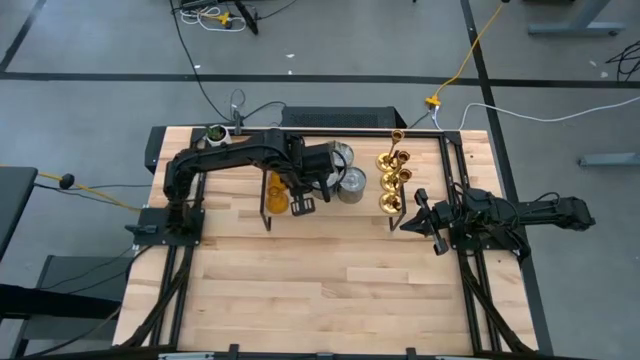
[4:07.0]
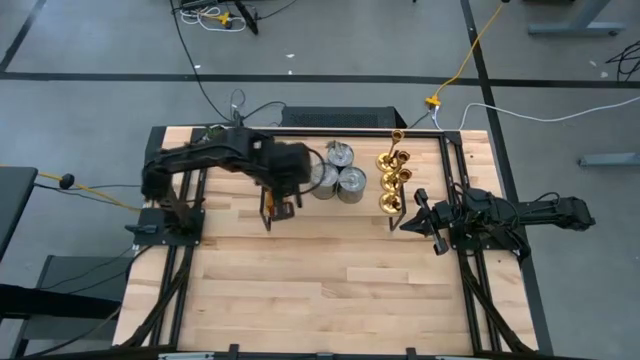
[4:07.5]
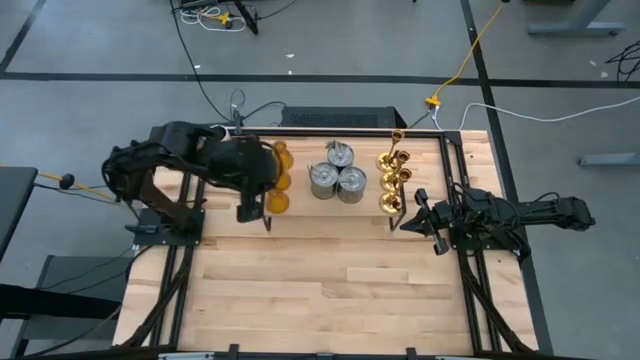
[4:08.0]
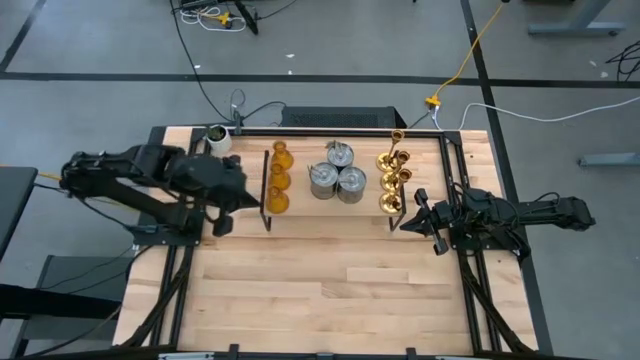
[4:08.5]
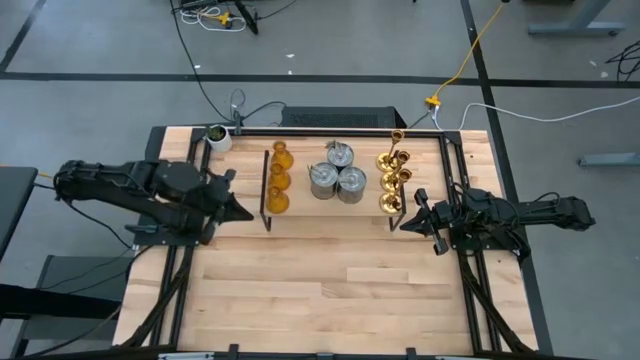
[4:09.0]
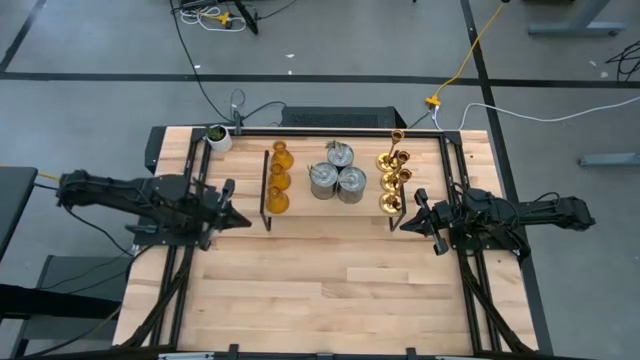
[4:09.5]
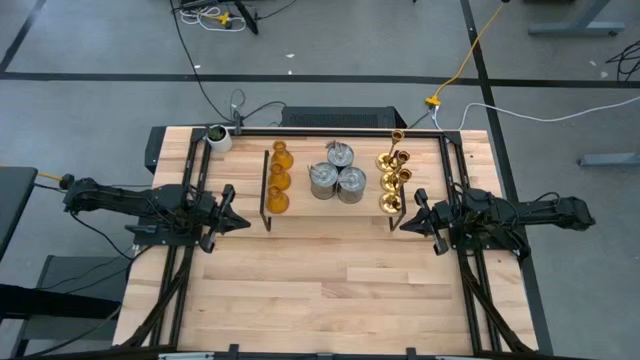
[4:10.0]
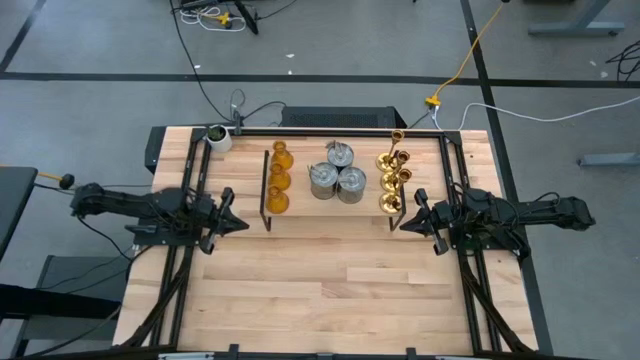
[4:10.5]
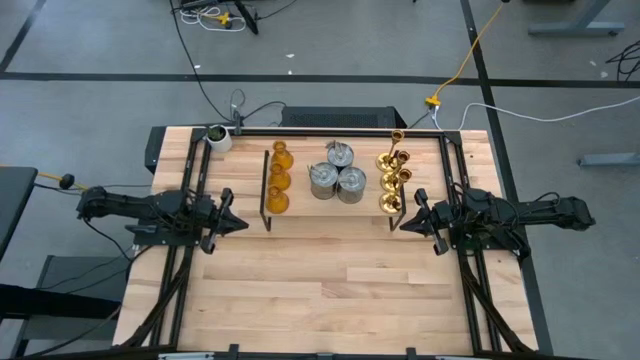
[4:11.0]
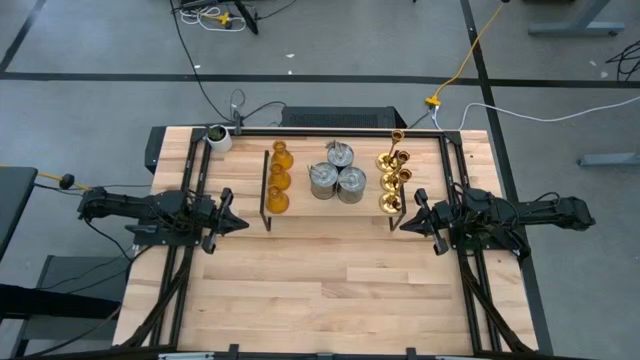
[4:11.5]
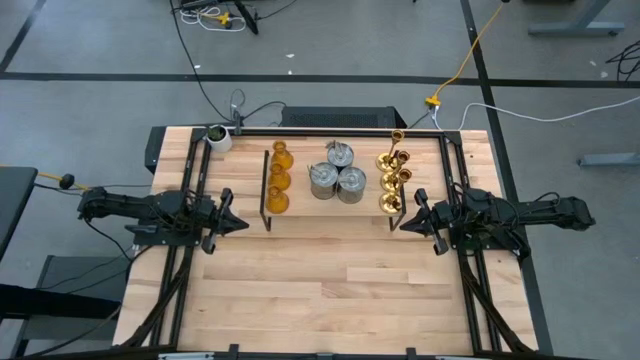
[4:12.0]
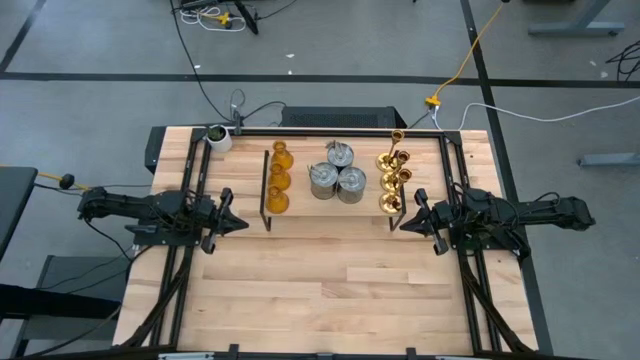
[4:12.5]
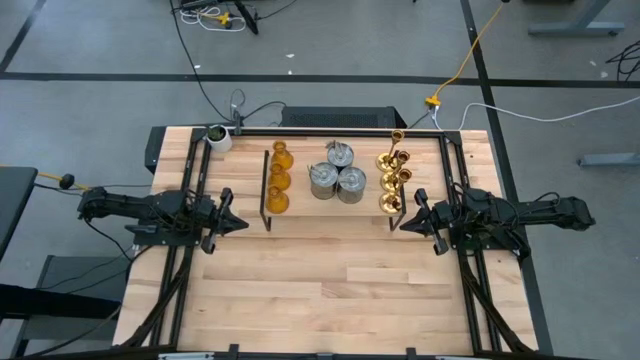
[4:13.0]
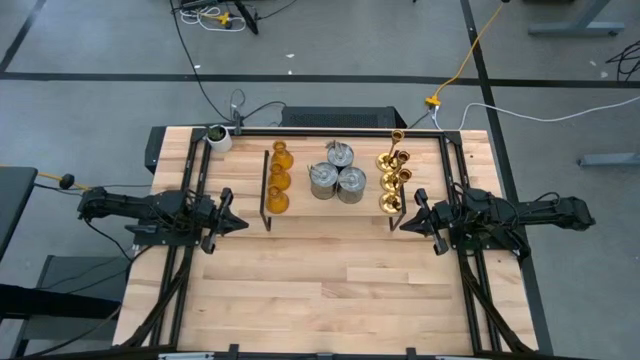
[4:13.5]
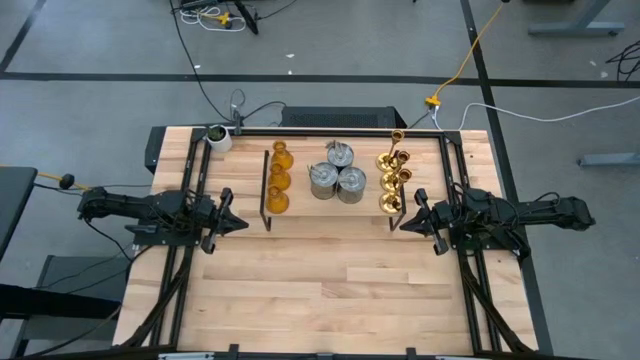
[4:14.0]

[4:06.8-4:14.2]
Task: Pick & Place candle stick holders
Return to Home Position

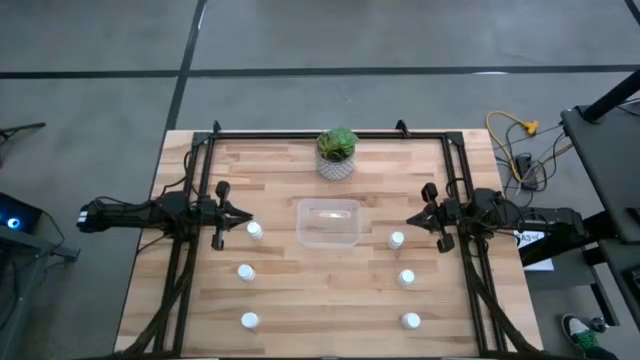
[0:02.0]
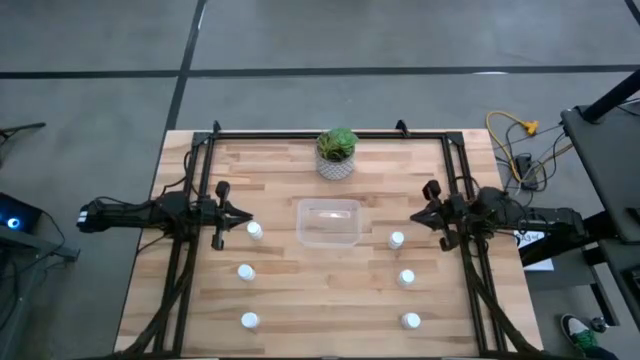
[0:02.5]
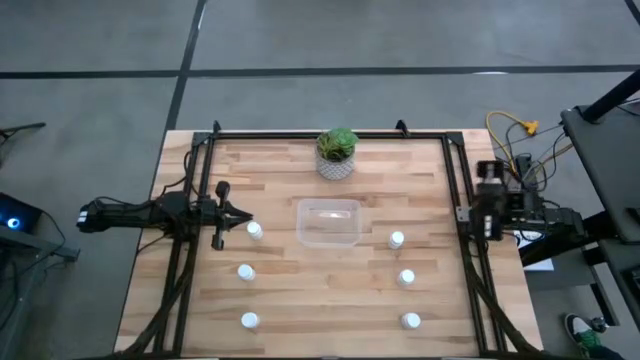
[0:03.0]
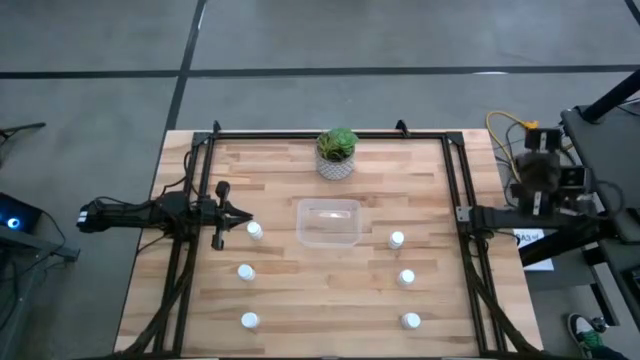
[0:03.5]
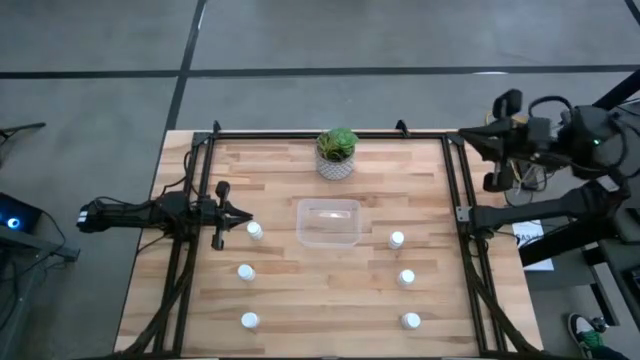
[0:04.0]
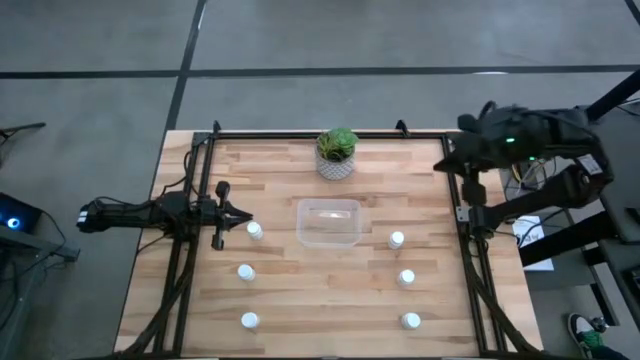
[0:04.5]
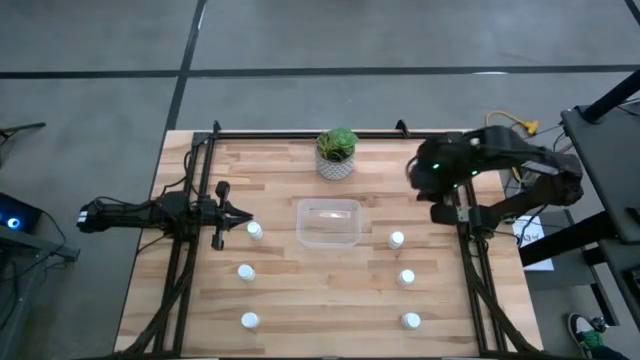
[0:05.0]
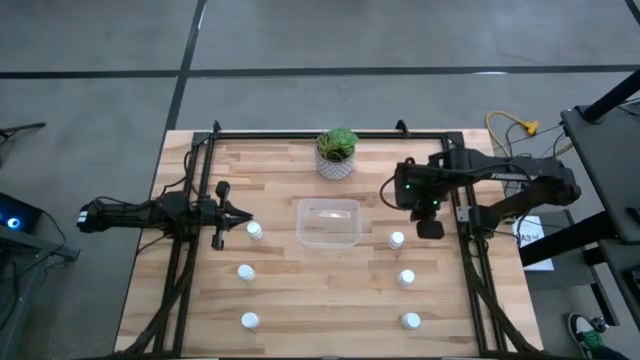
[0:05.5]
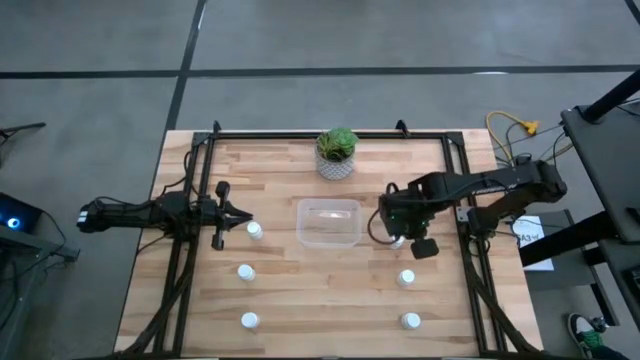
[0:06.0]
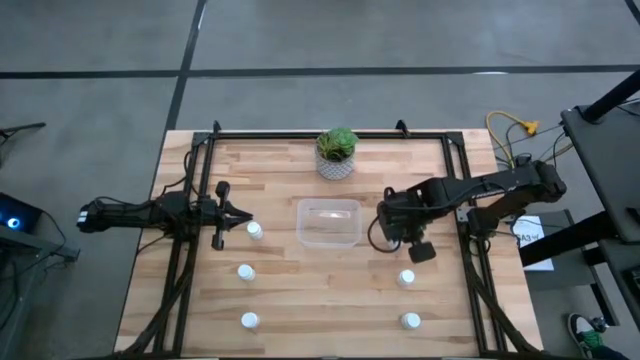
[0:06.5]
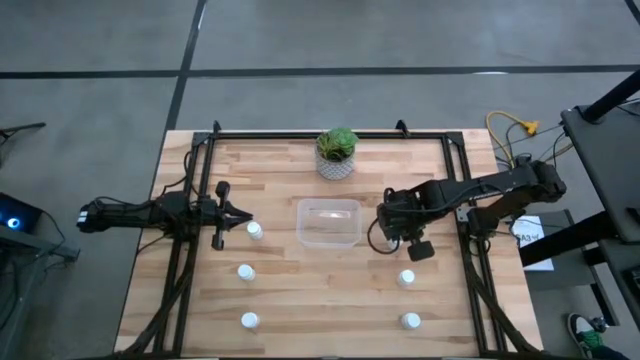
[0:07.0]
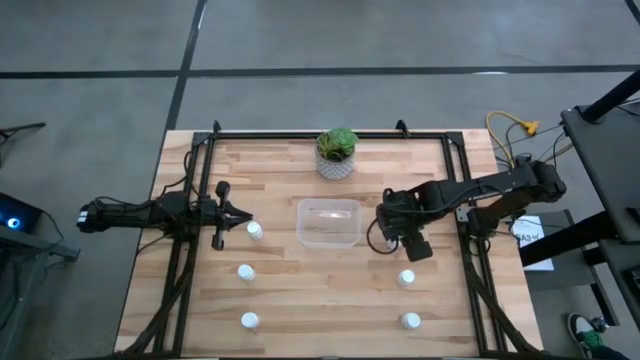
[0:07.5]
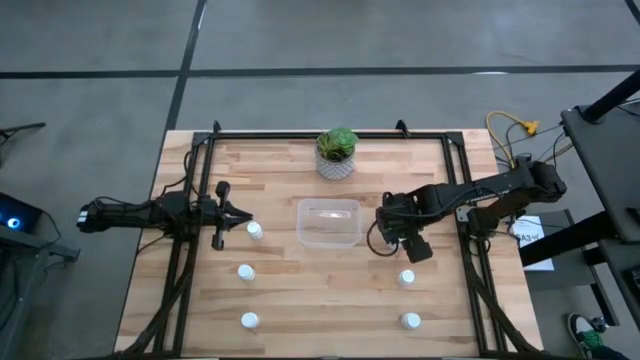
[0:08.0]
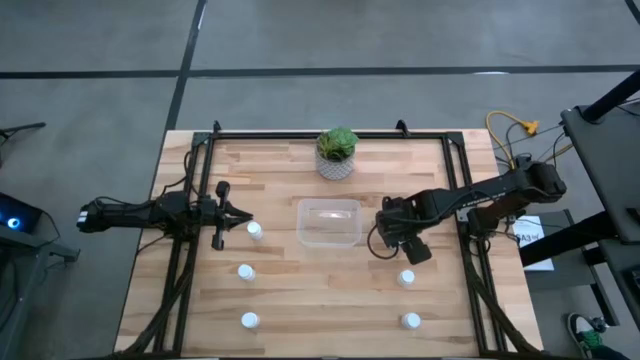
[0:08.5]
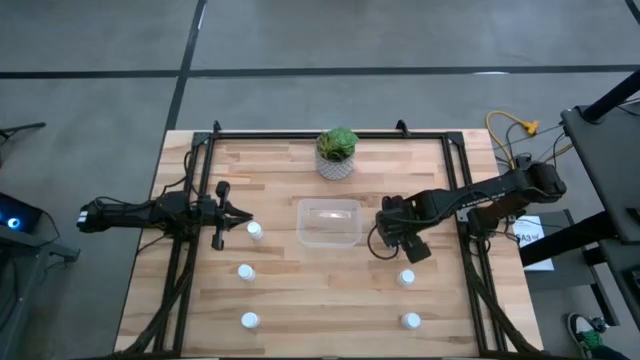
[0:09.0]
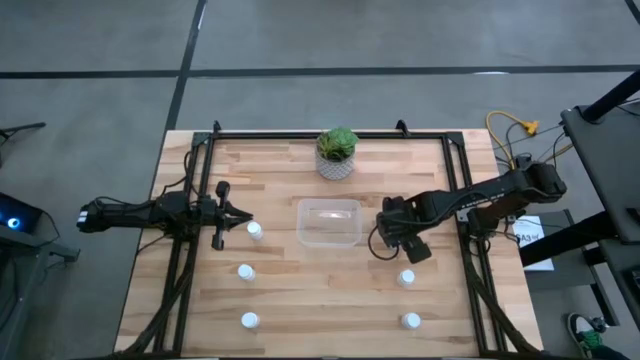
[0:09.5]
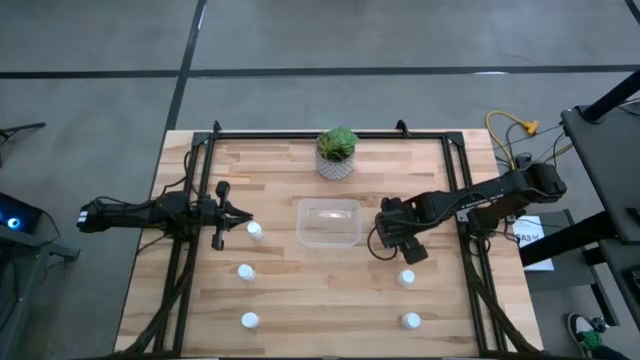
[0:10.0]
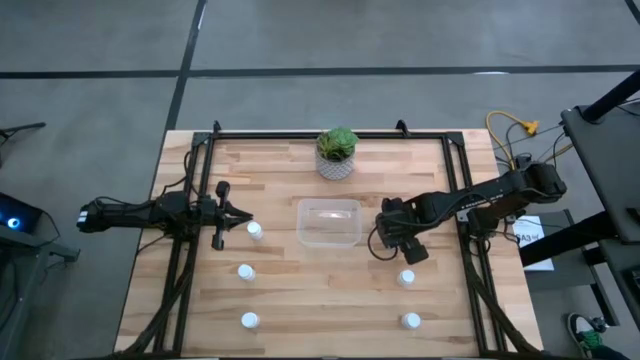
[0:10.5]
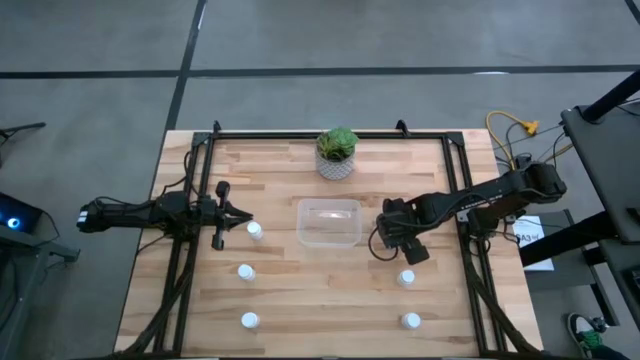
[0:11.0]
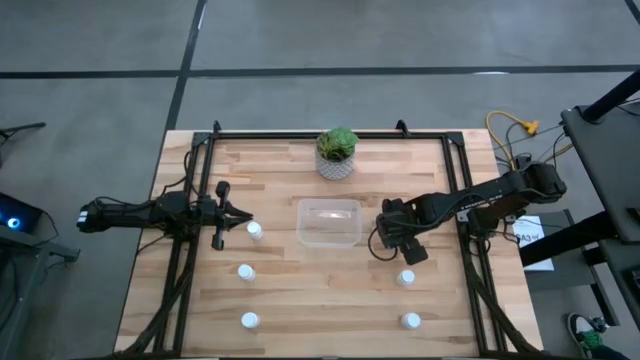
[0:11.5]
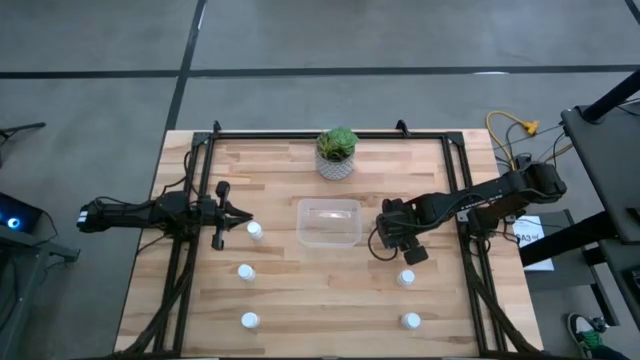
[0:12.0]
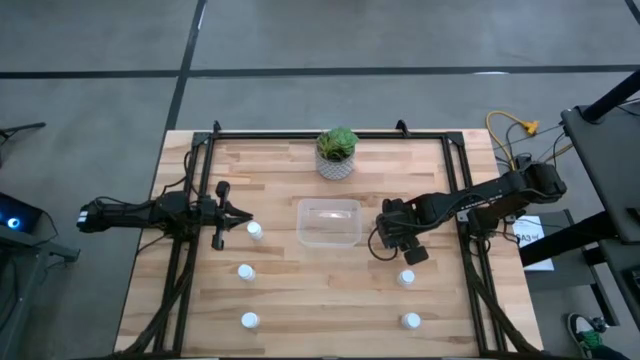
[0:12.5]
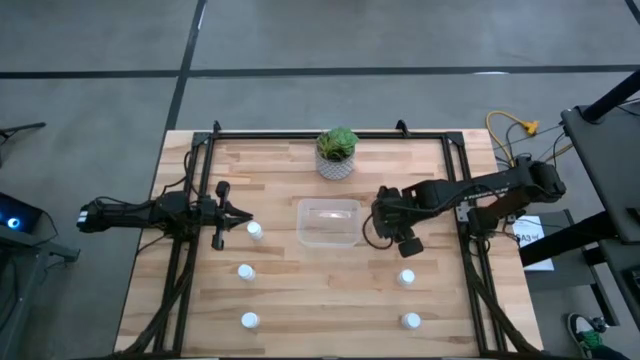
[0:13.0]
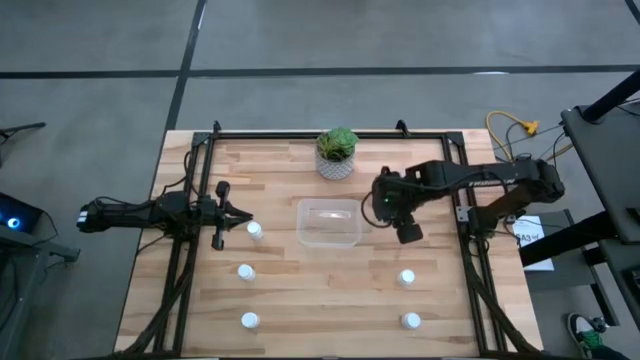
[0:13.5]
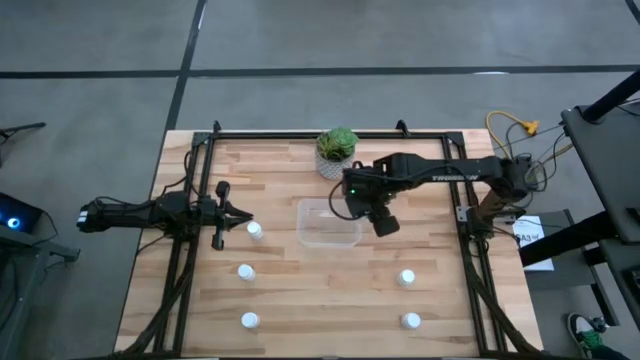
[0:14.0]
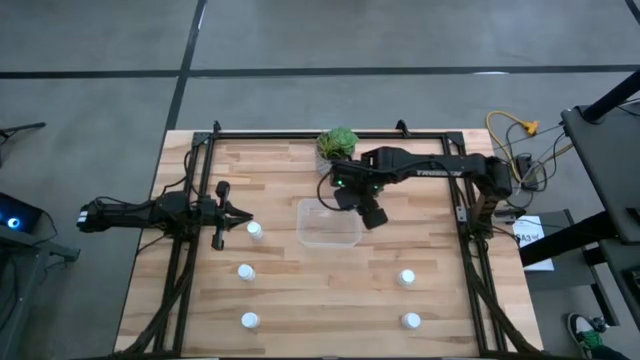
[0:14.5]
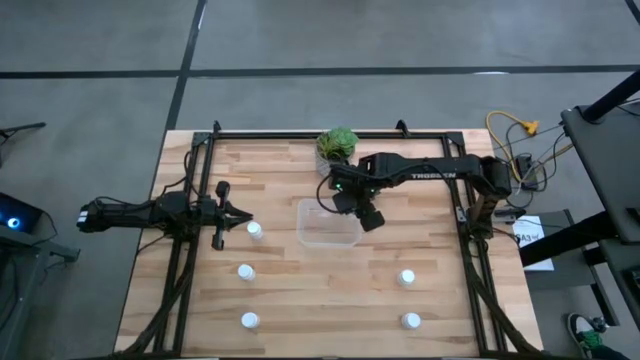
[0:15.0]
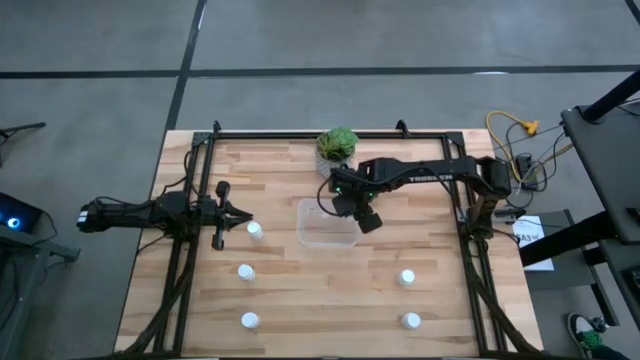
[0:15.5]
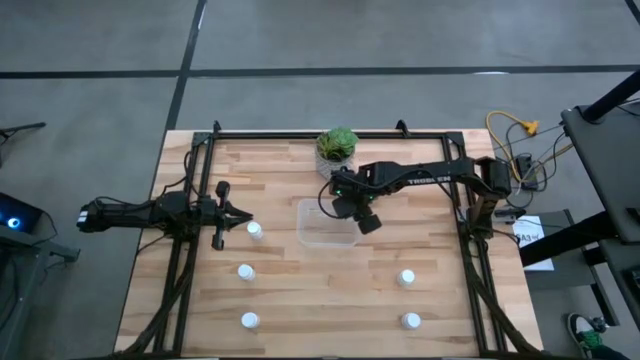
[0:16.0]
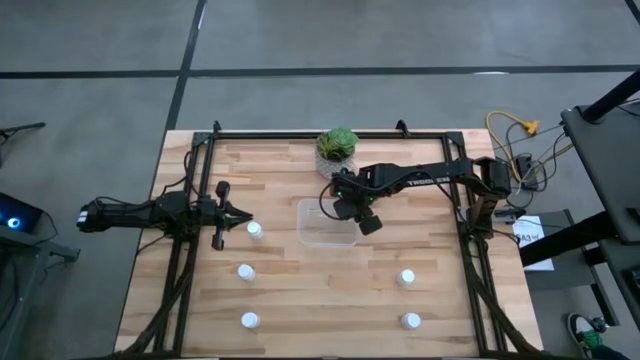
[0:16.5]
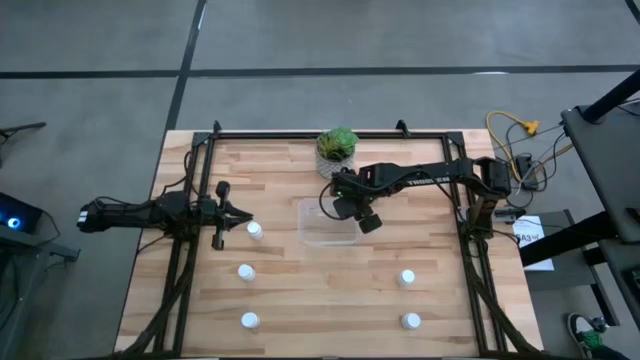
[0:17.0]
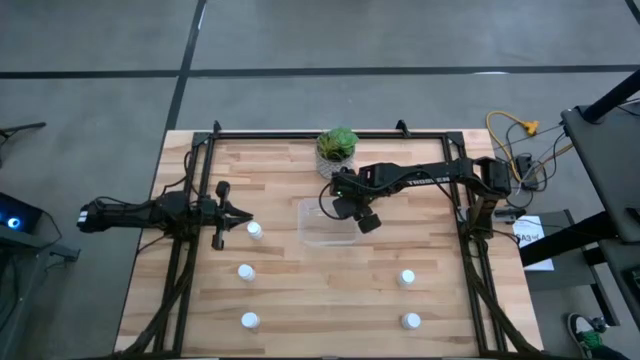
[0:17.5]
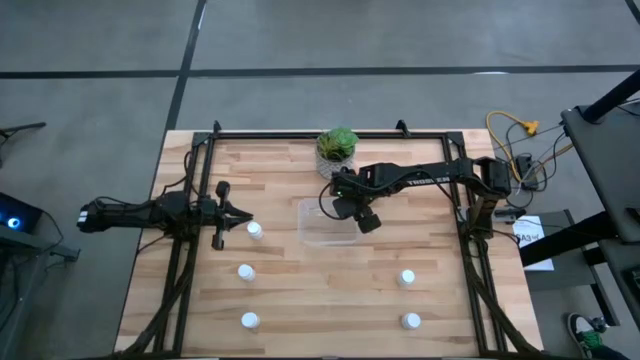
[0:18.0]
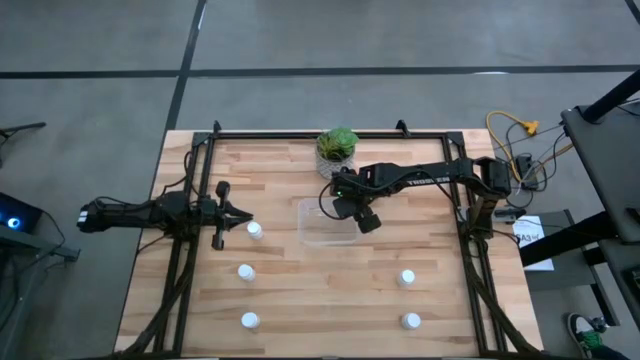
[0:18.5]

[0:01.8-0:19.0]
Task: Pick and place pill bottles into a basket
Put the white medicine bottle into the transparent bin
